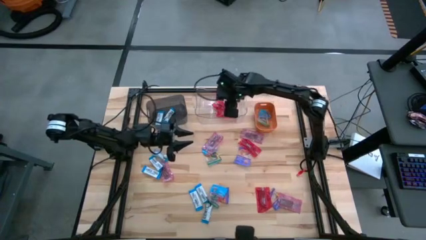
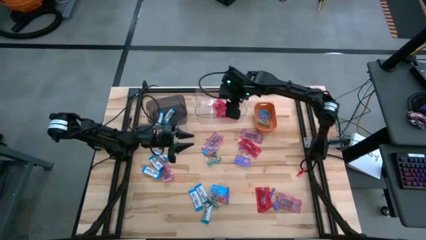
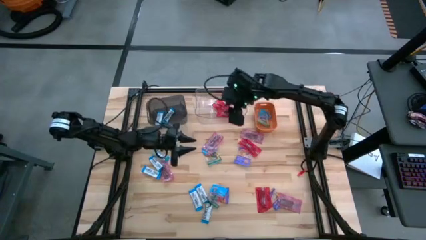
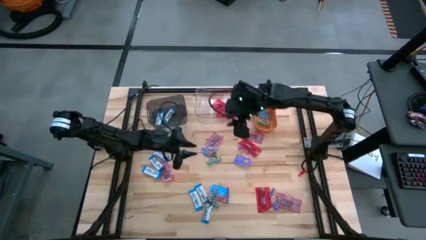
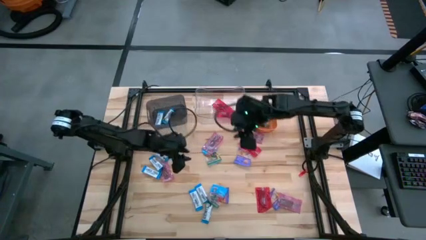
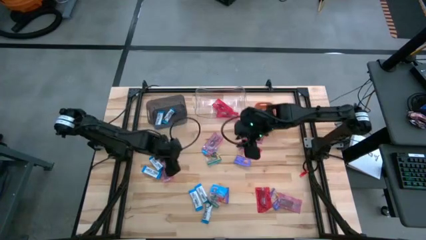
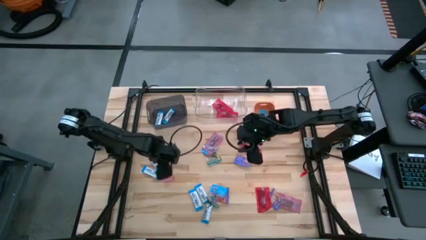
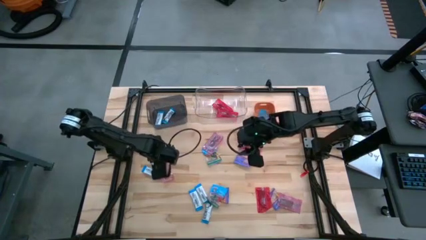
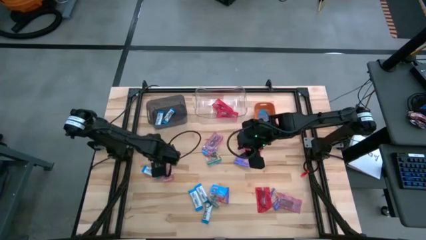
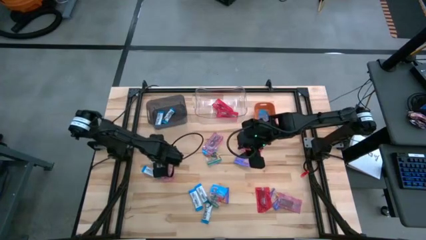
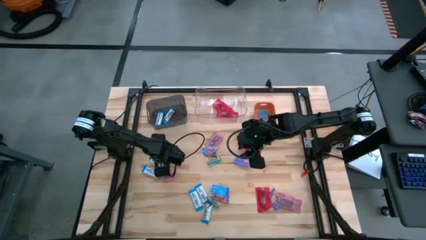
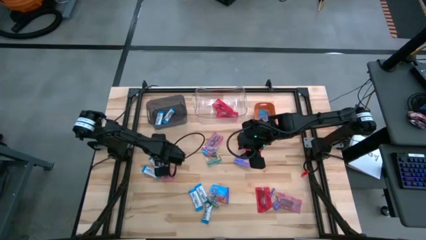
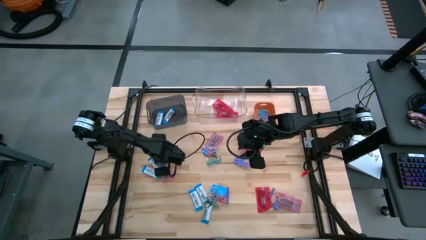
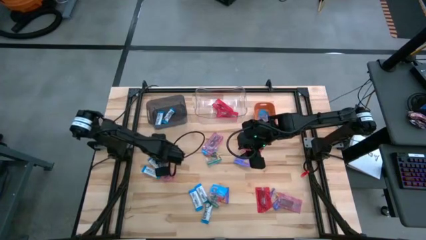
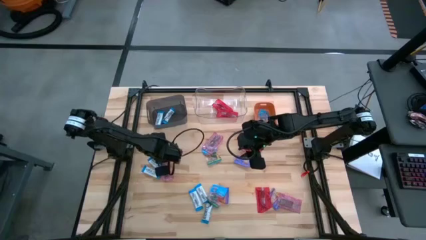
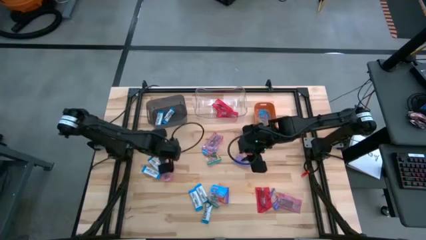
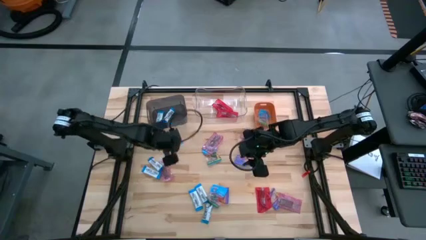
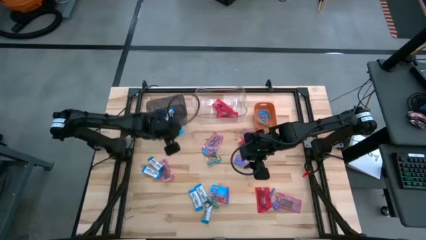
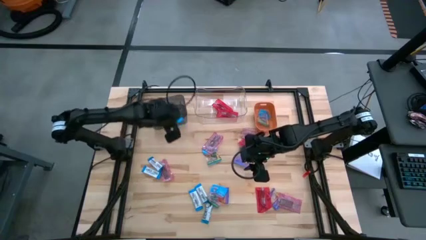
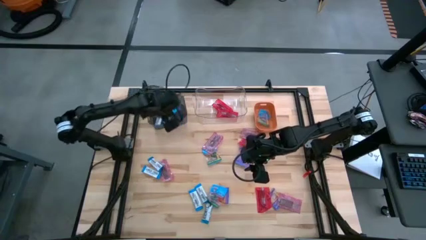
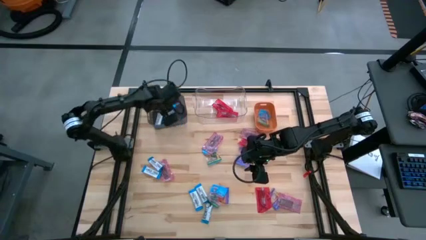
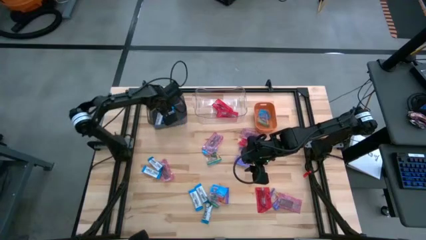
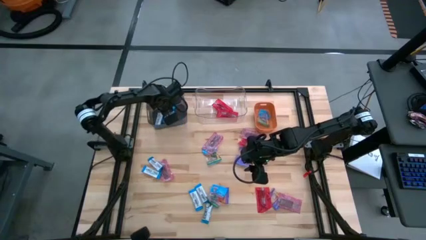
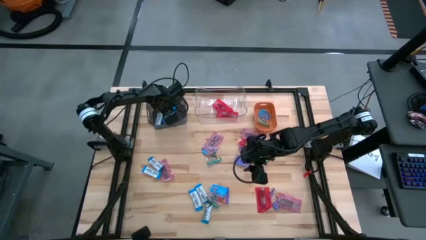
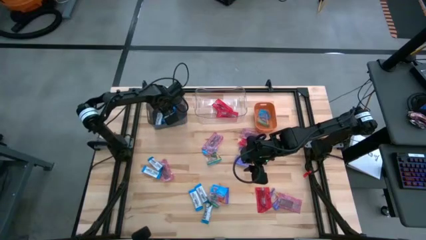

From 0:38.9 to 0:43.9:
Task: Sort candy
Put the white chocolate into the black bin

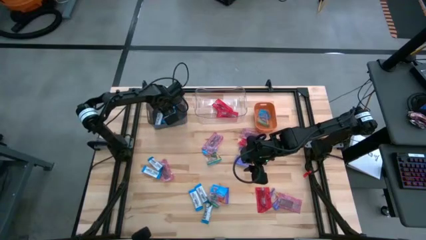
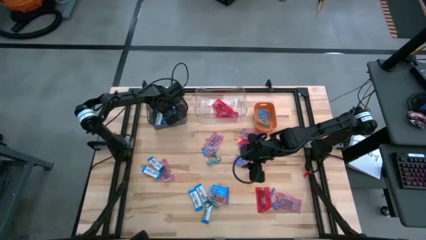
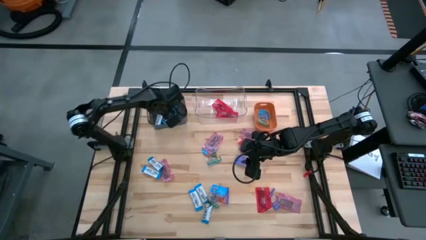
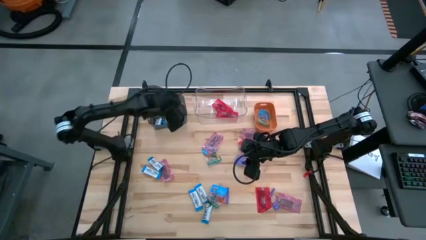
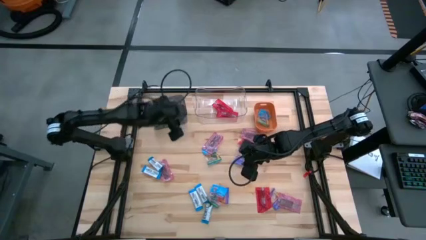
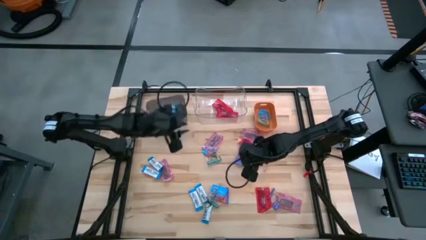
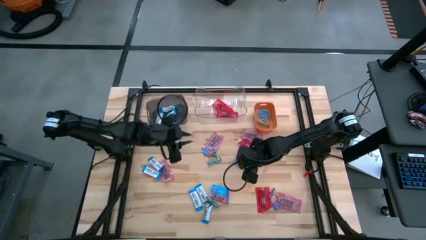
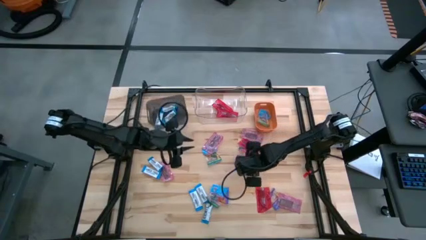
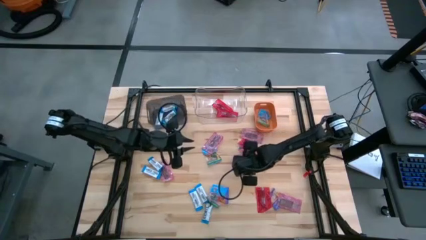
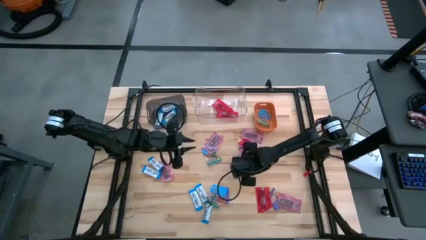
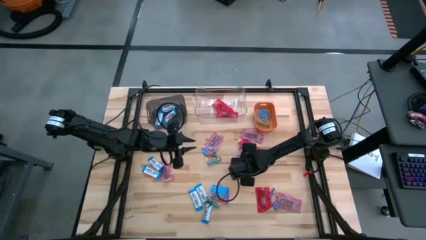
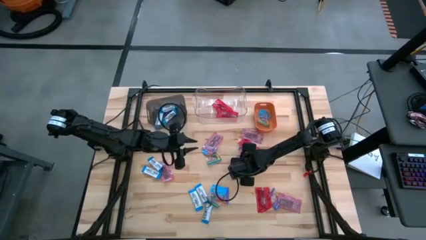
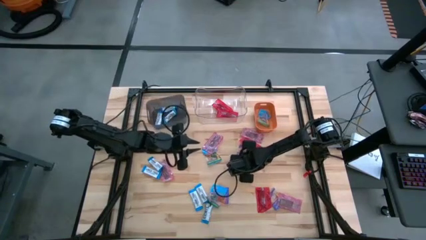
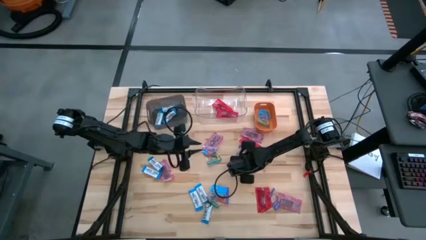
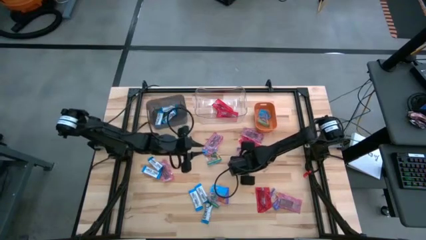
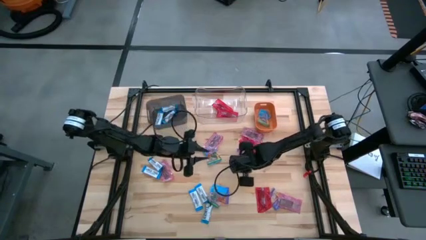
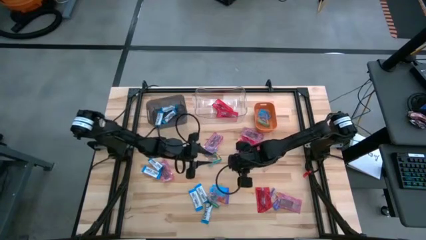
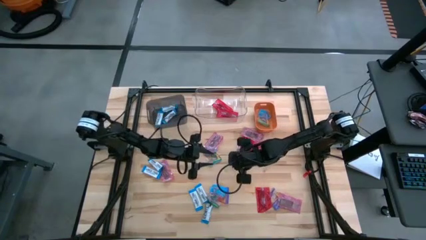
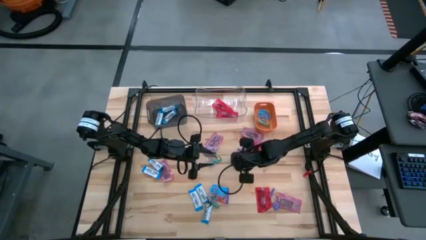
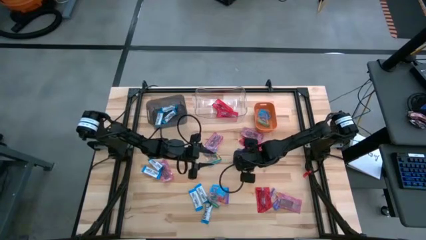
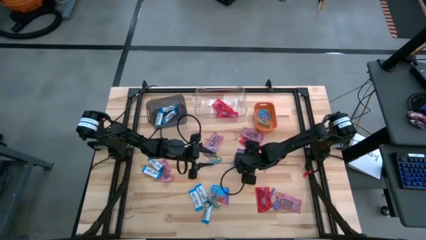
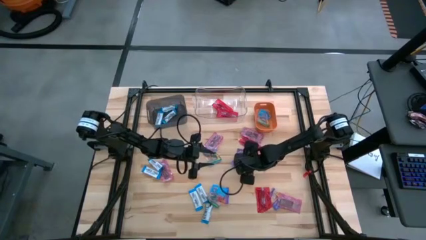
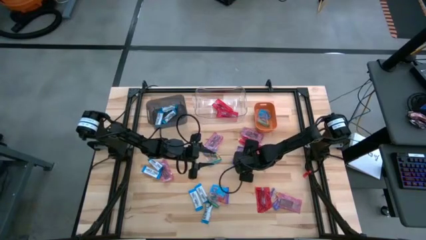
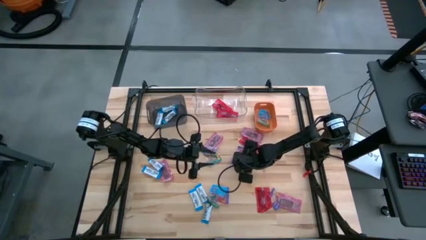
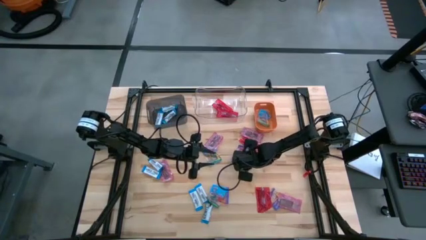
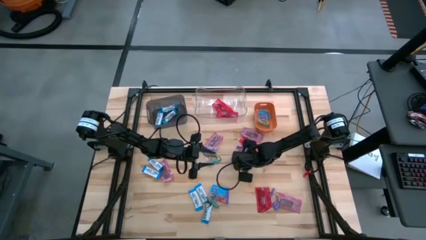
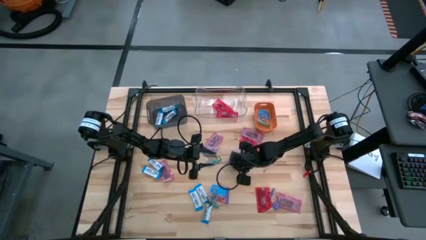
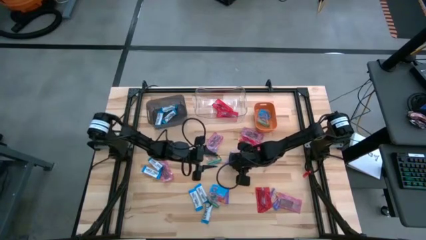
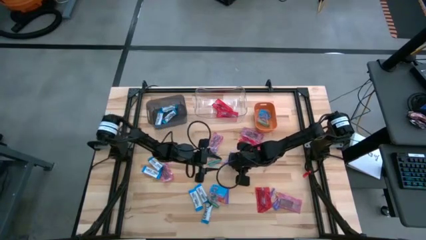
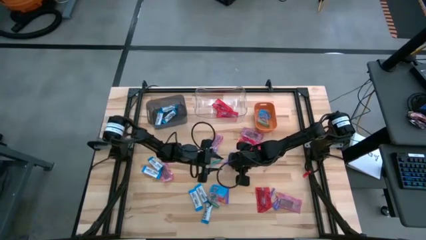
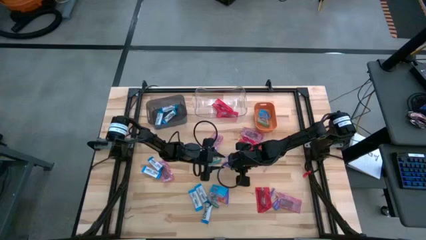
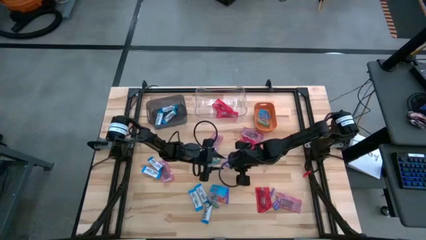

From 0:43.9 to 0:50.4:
Put the blue gummy into the orange bin

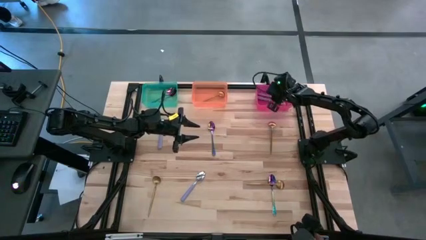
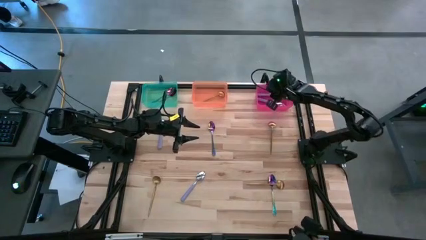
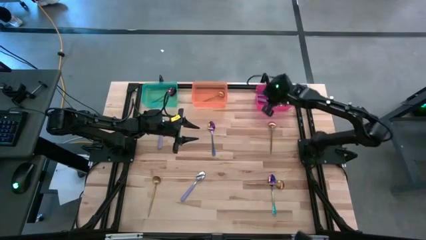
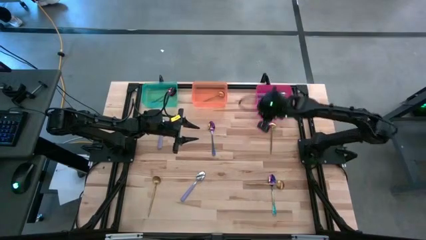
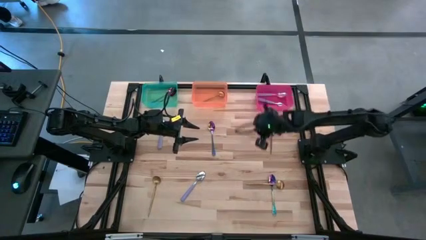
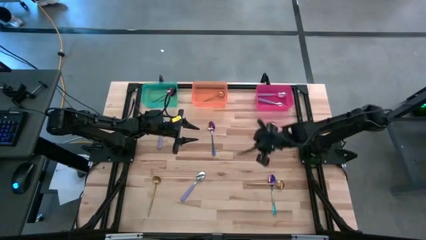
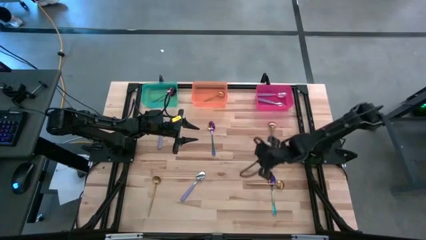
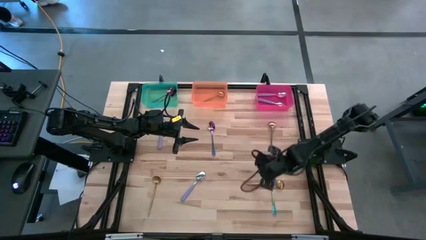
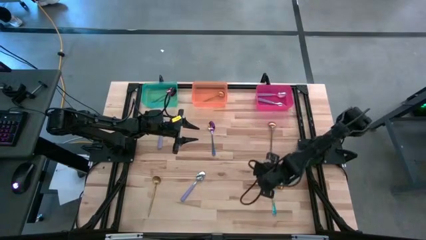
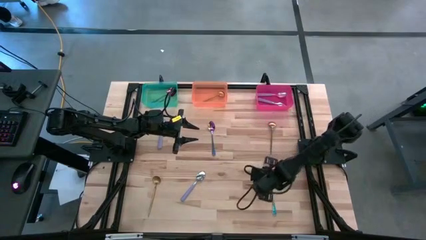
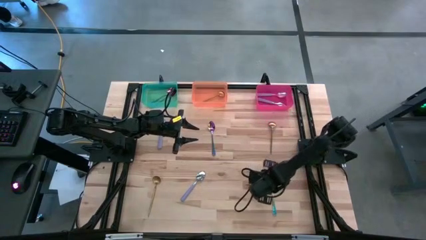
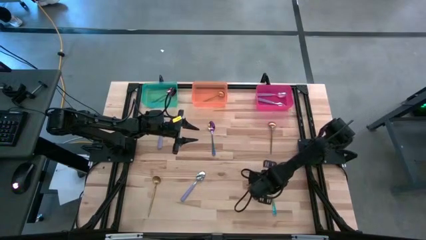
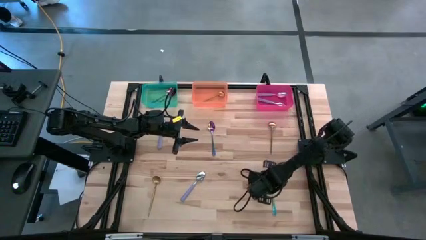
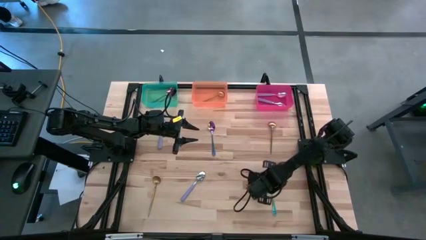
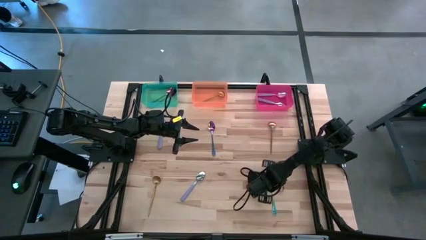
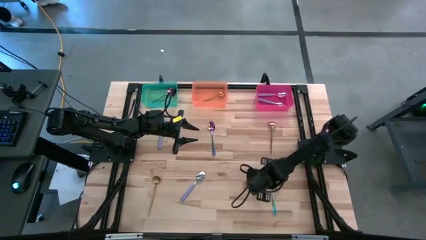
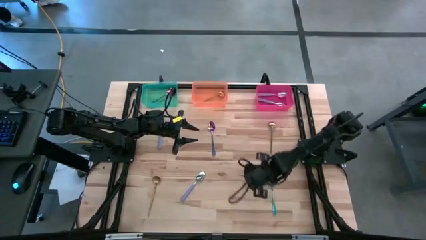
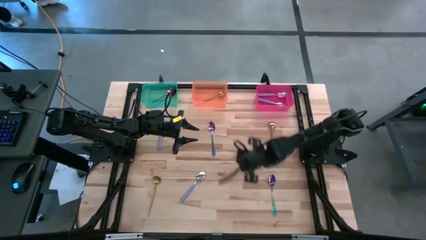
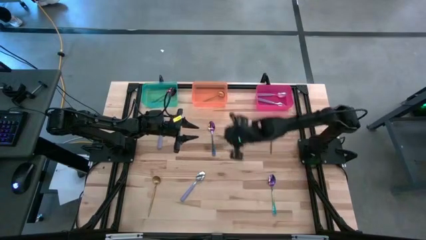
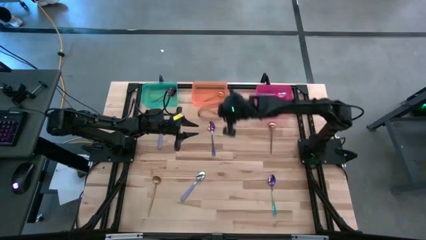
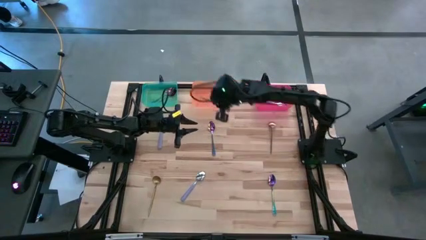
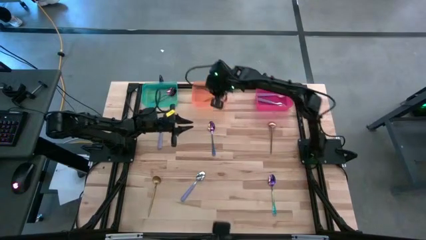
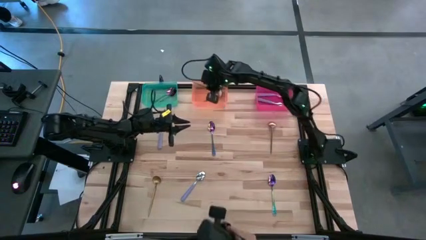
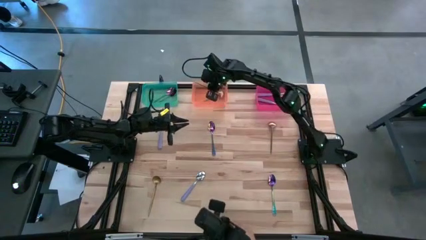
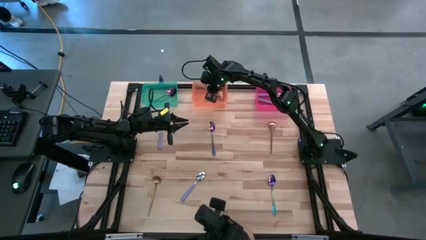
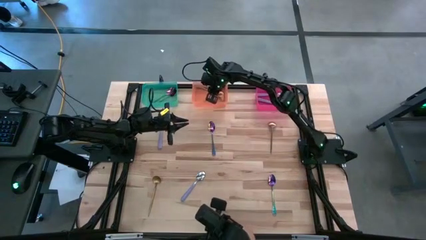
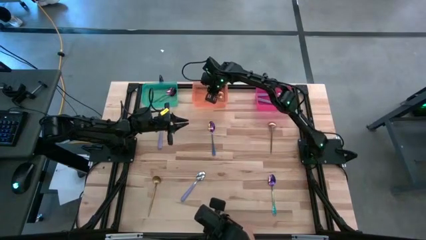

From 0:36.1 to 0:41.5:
Task: Sort silverware by color (type)
Put the gold spoon into the orange bin

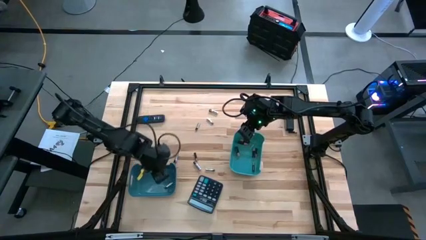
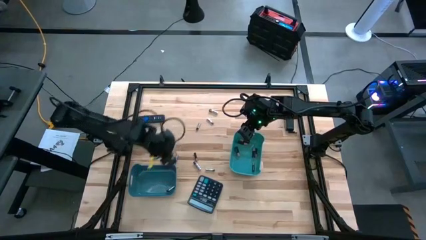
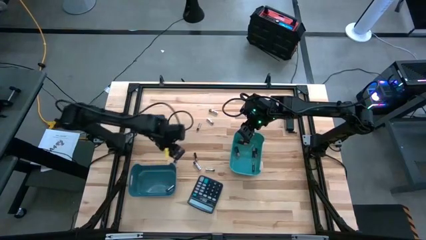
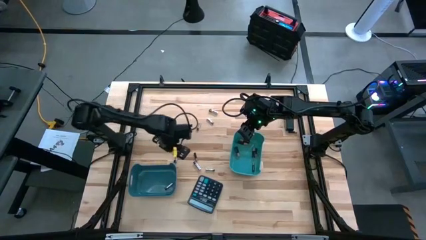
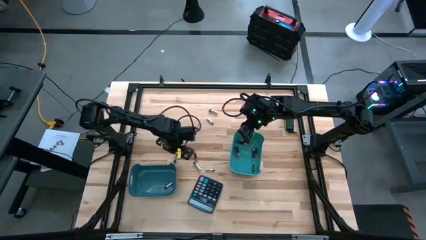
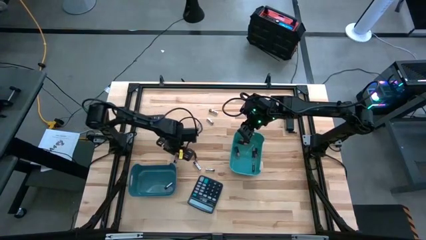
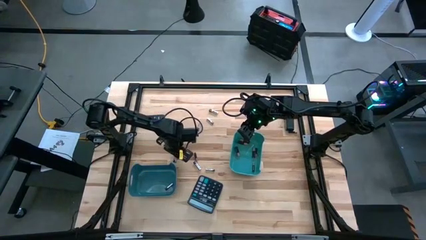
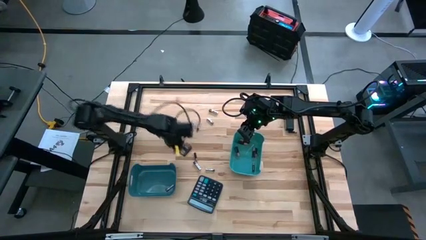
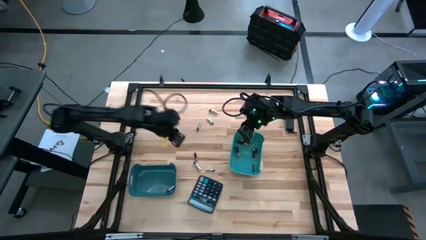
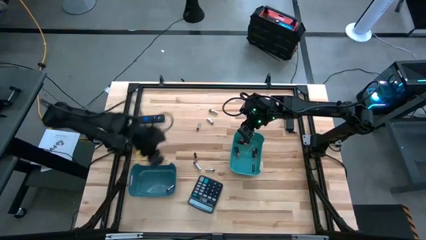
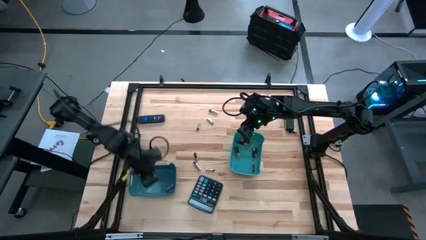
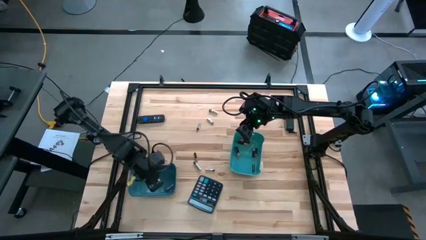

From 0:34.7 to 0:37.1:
Task: Sort batteries
Put the silver battery into the dark blue bin
